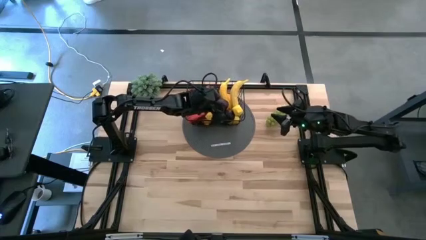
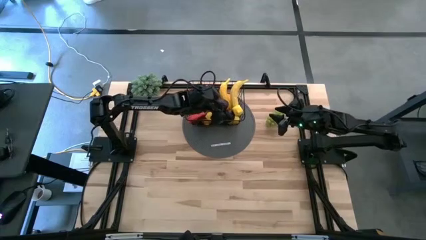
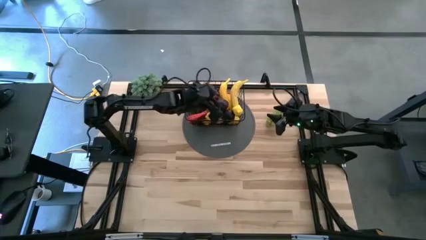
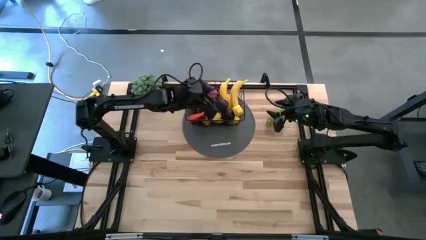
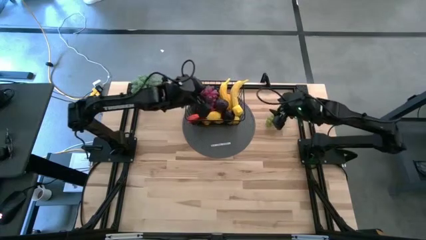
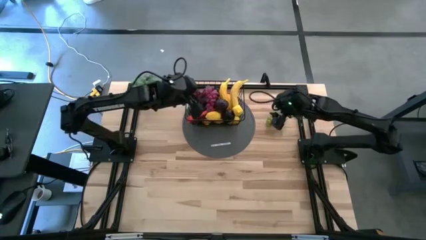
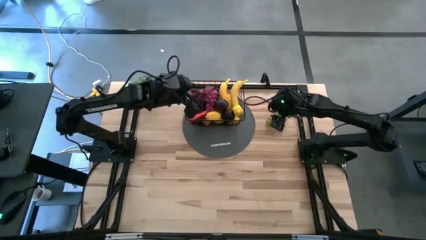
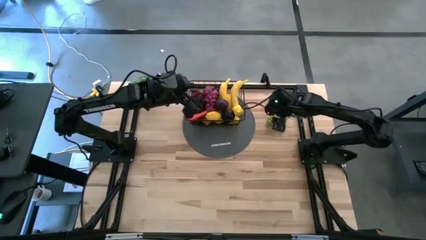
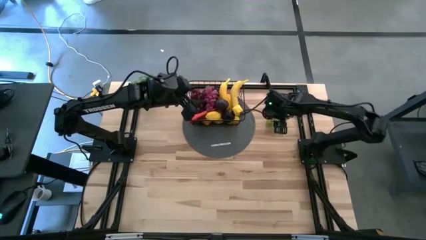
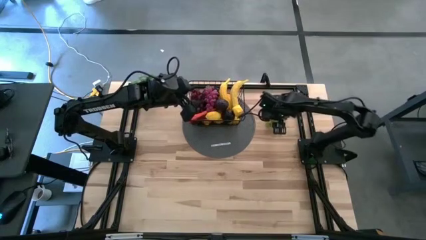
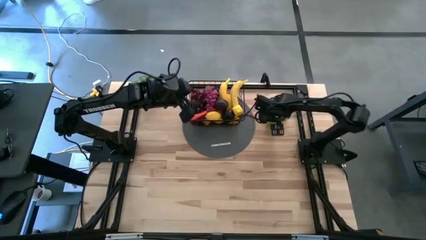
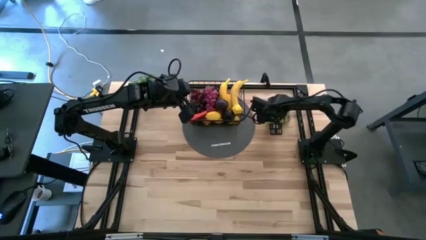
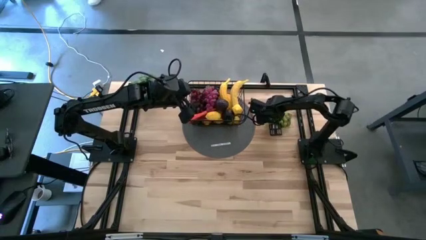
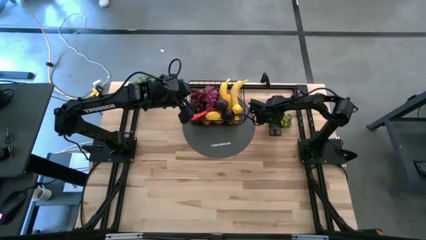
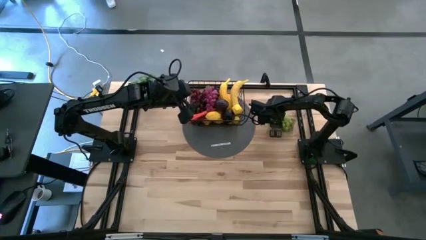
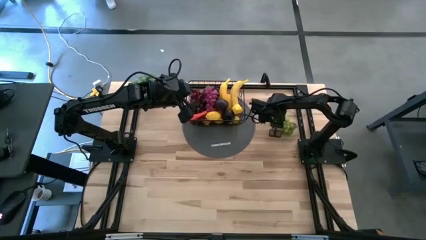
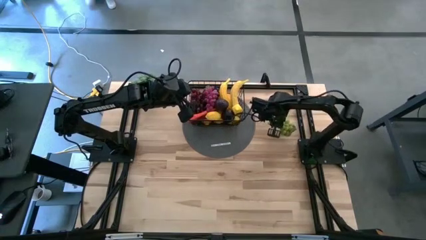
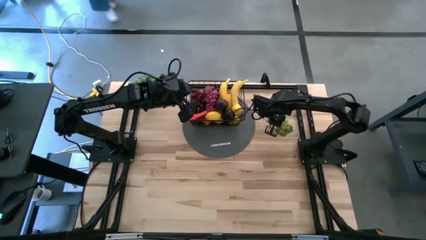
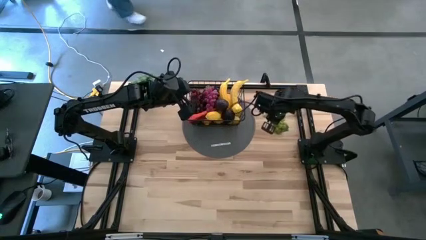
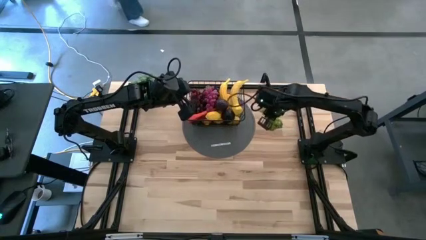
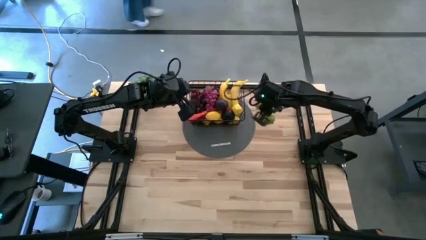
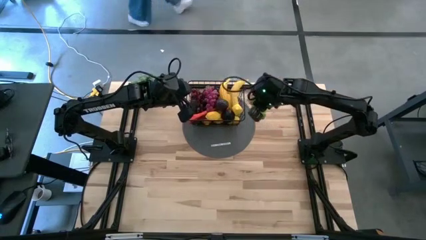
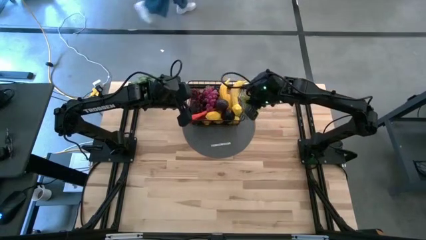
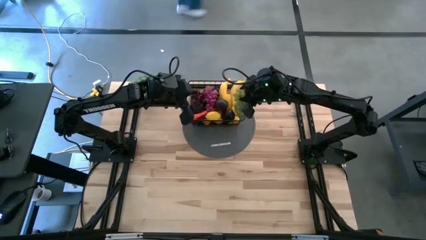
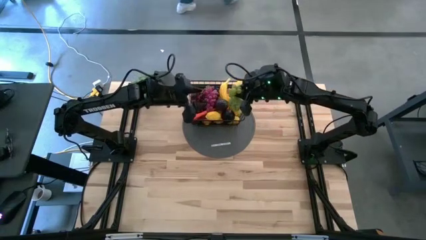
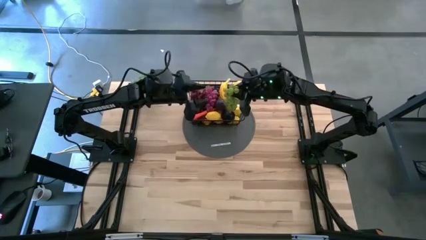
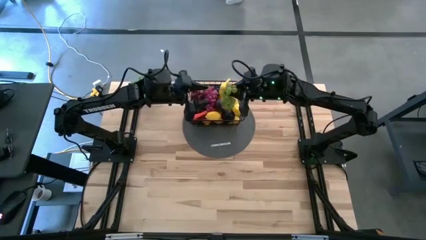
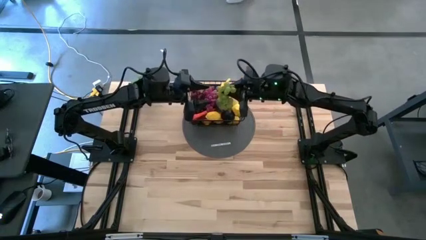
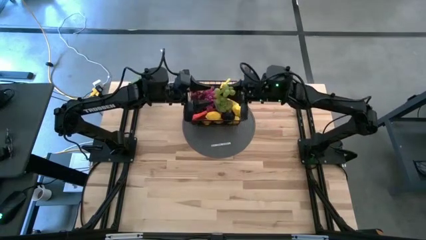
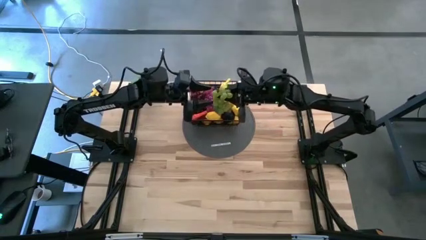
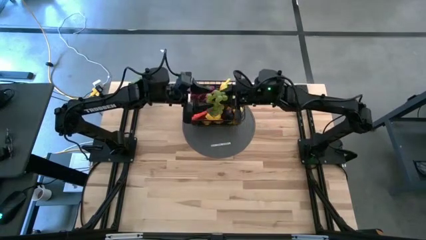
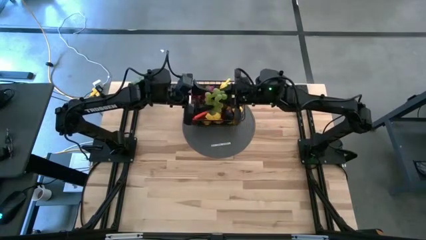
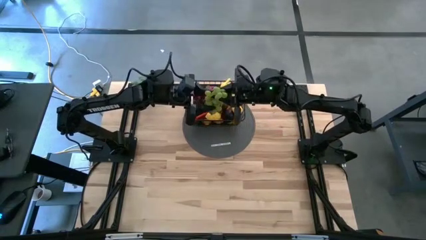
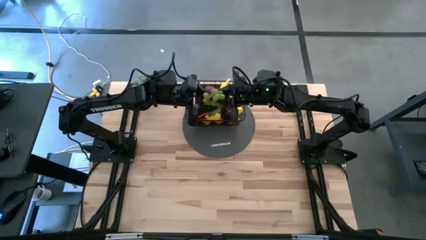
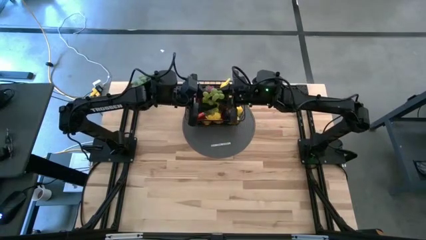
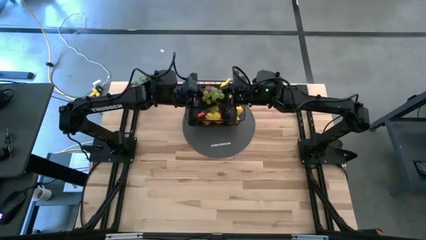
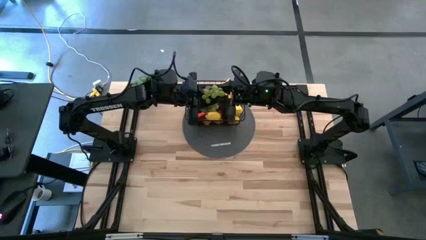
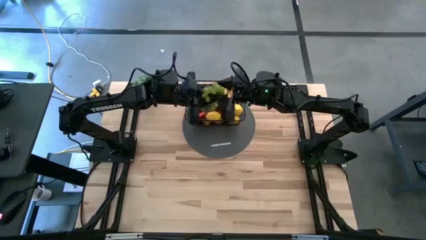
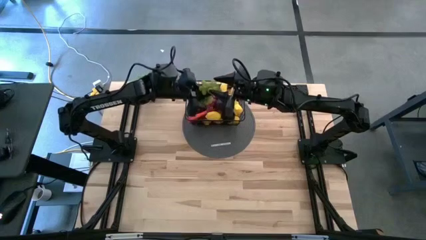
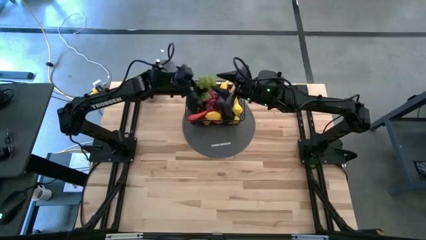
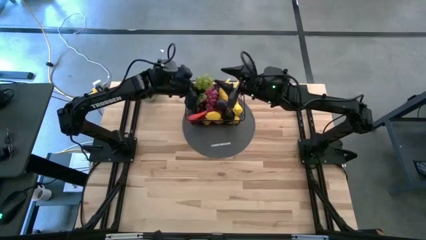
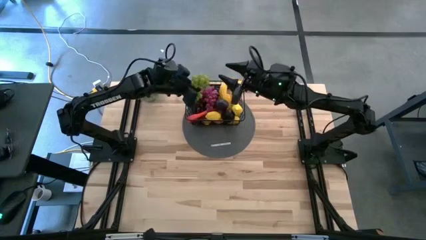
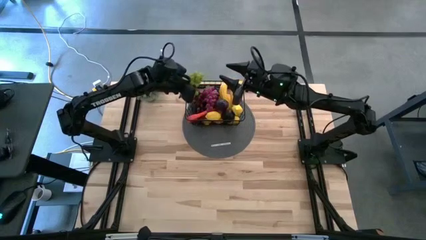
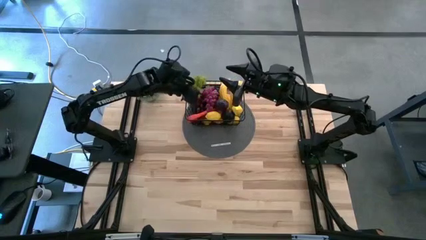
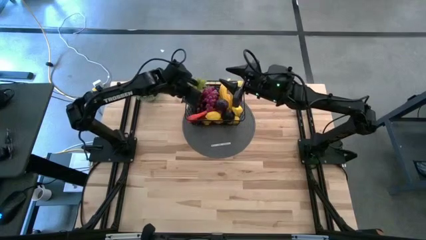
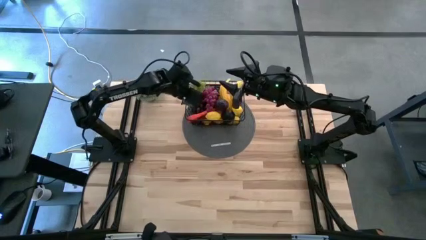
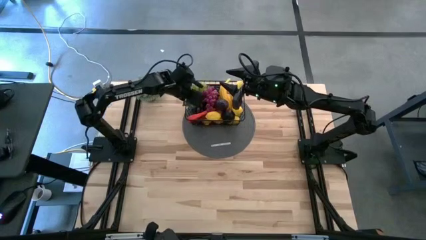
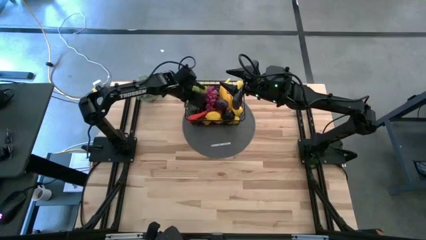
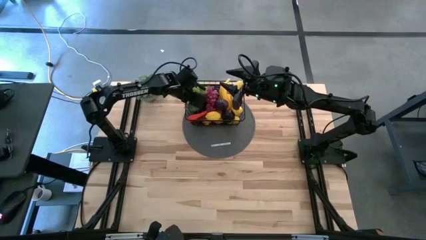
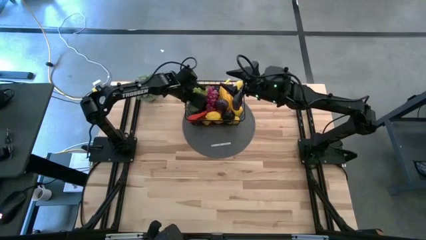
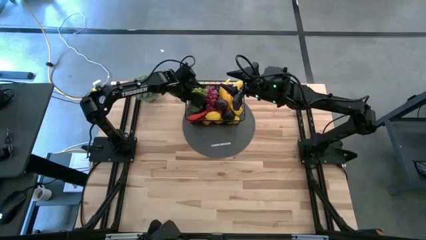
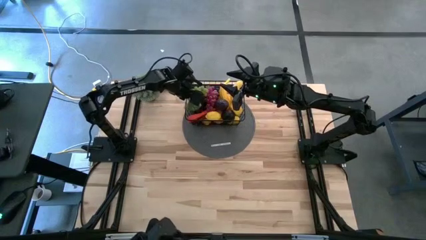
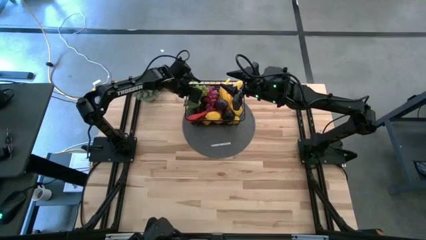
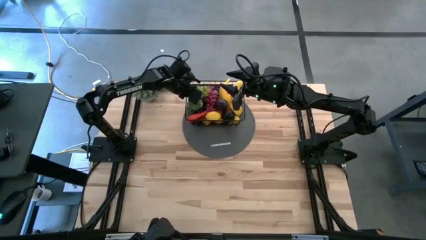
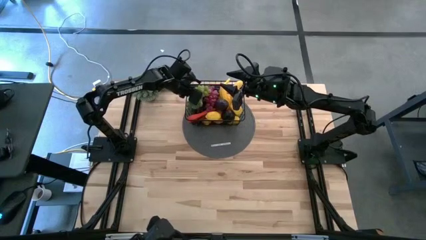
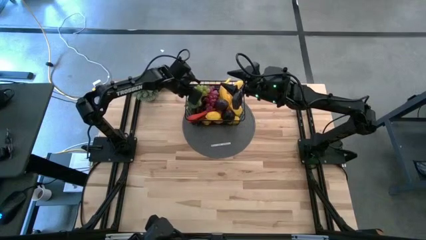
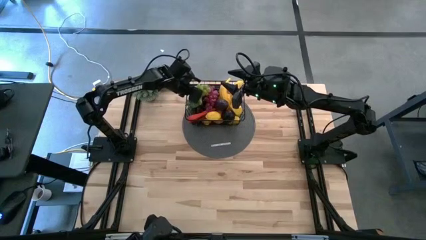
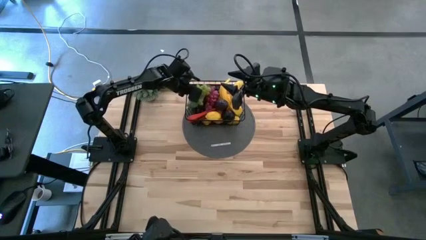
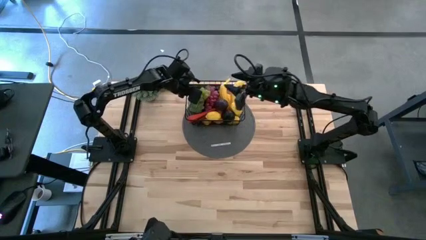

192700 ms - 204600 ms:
Task: Build produce basket
Put the green grapes into the black wire basket

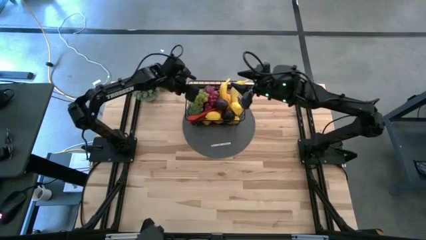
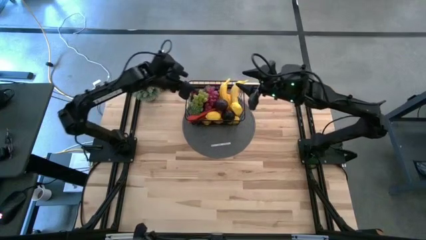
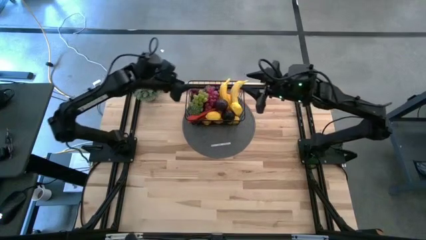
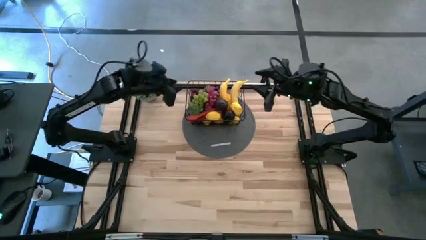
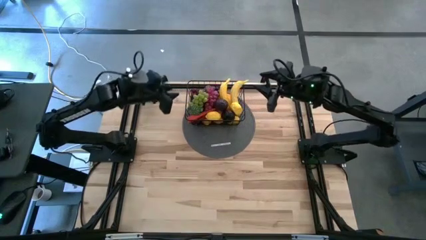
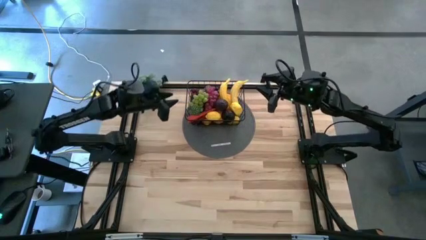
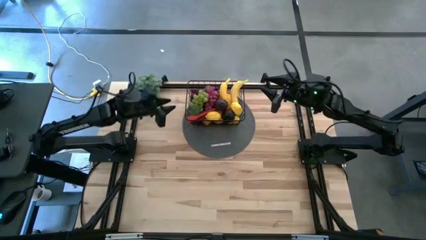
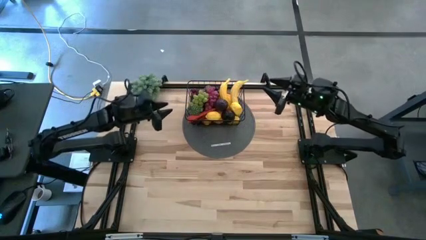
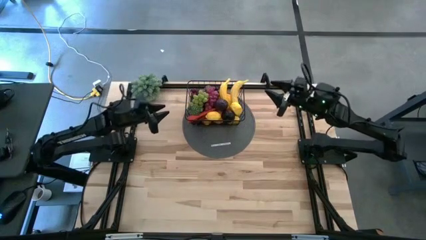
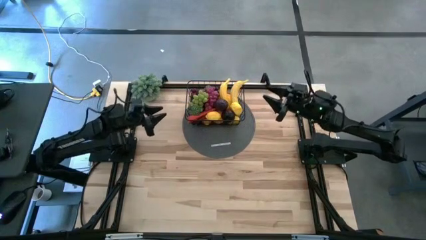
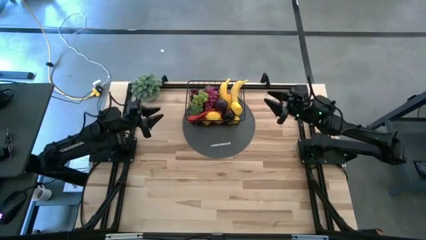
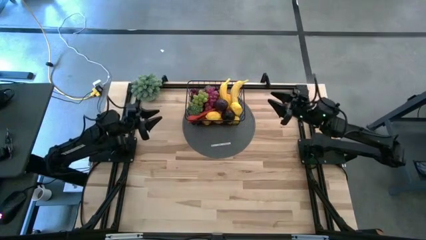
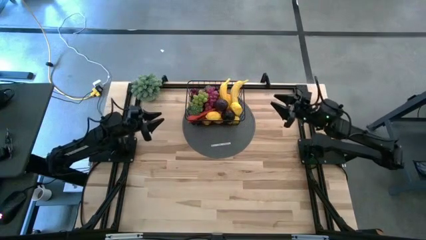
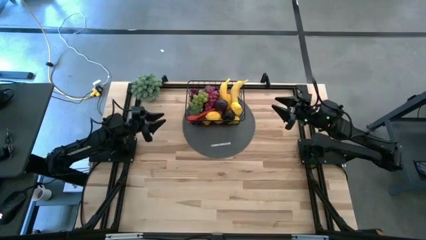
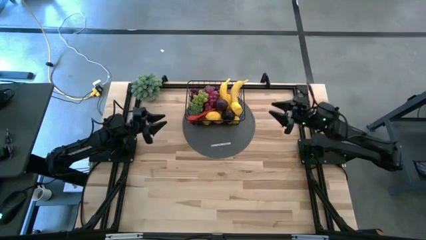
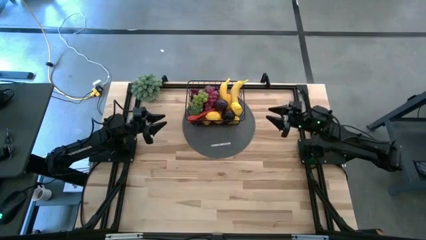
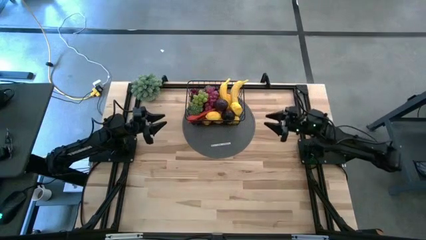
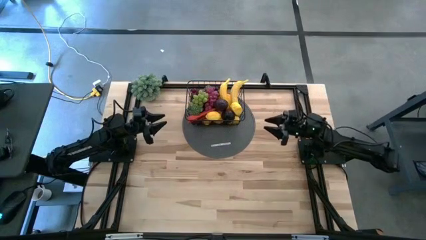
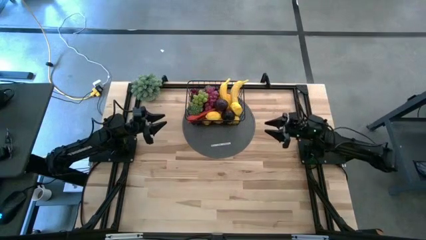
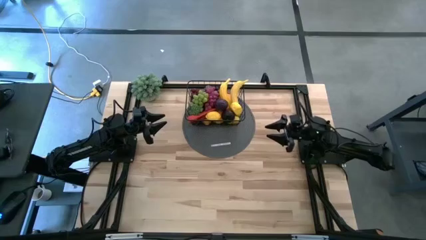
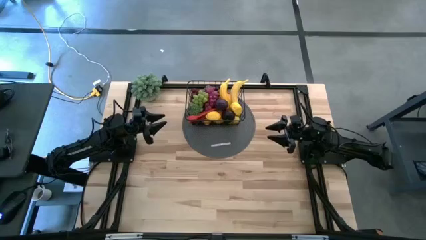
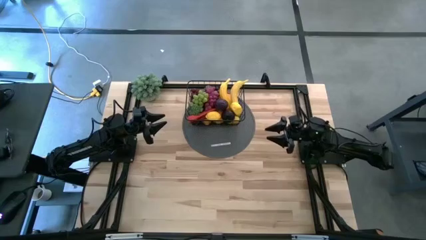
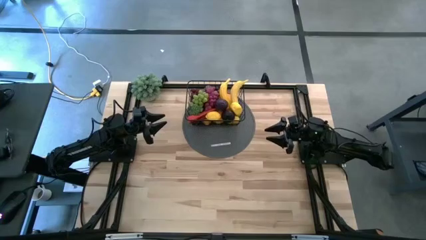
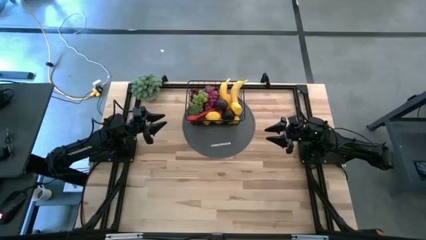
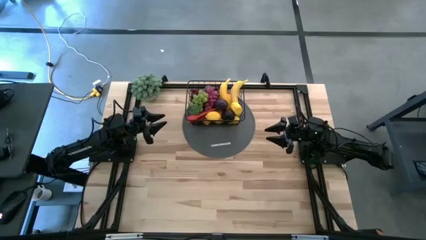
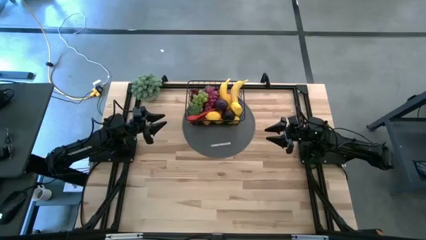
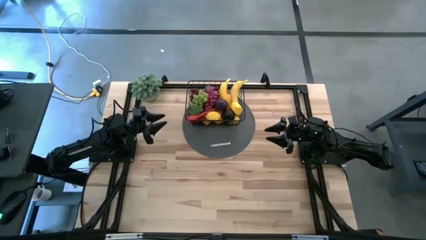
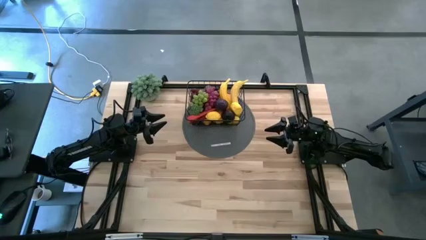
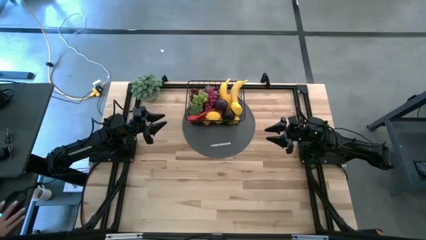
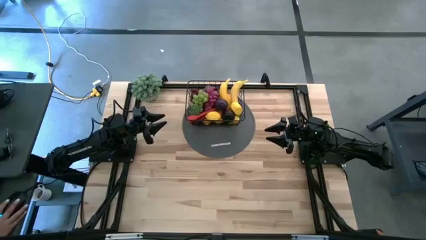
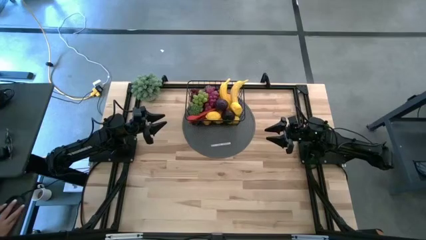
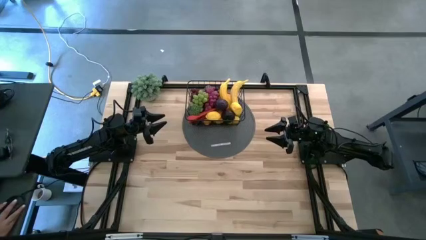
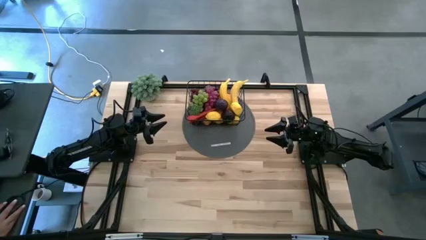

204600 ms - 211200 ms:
Return to Home Position
